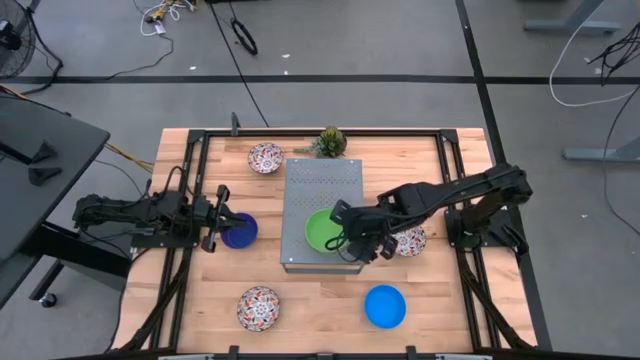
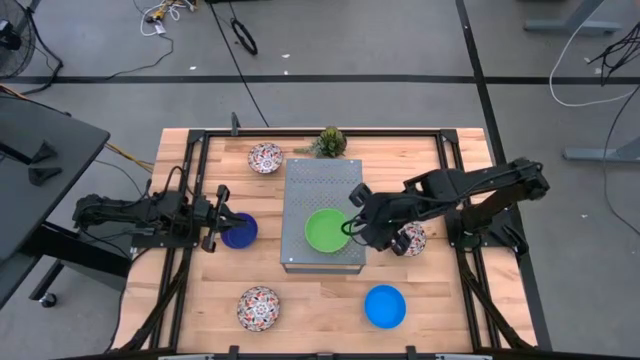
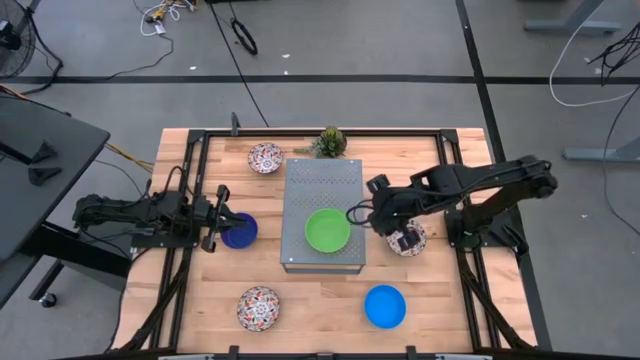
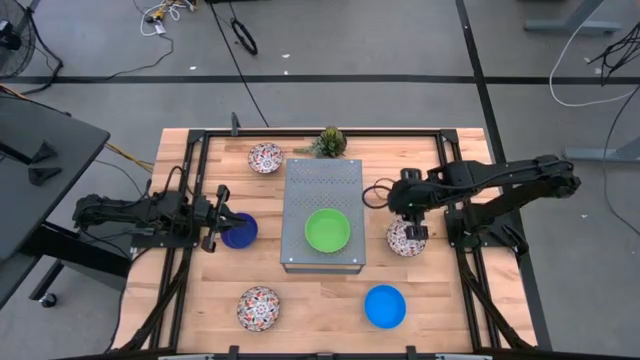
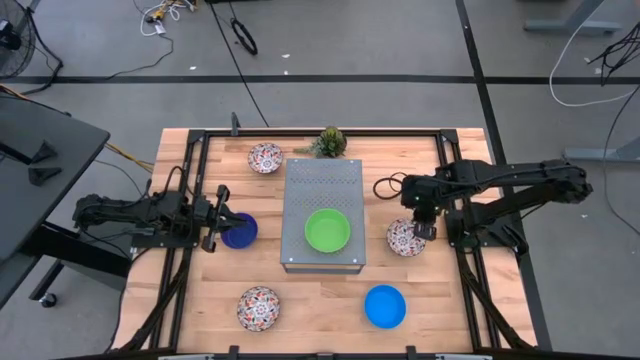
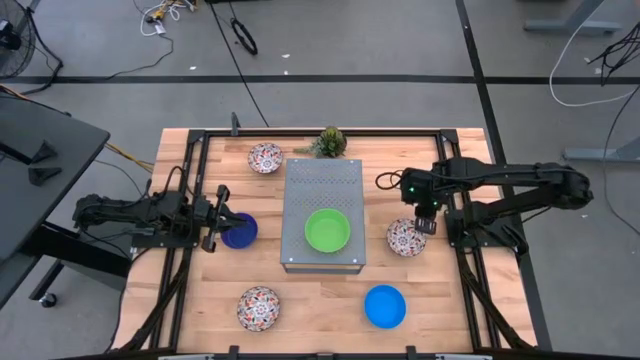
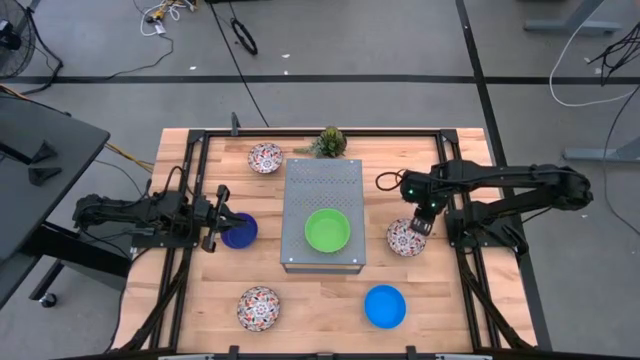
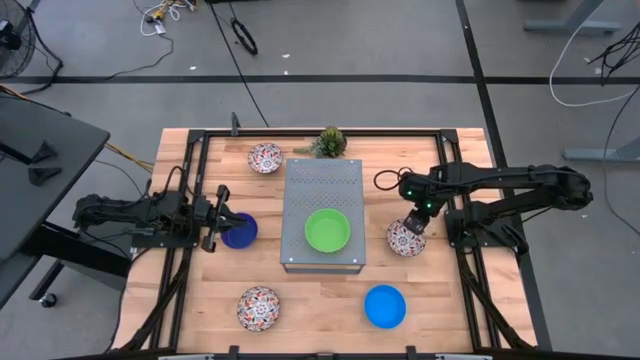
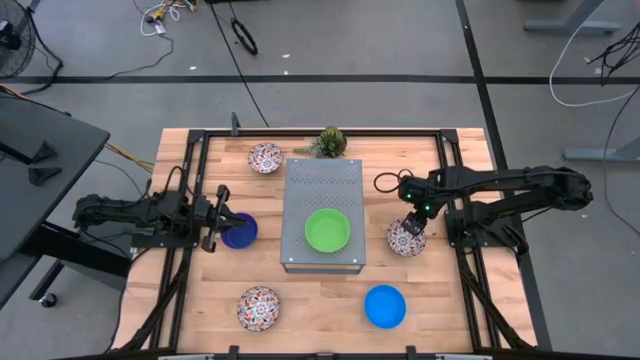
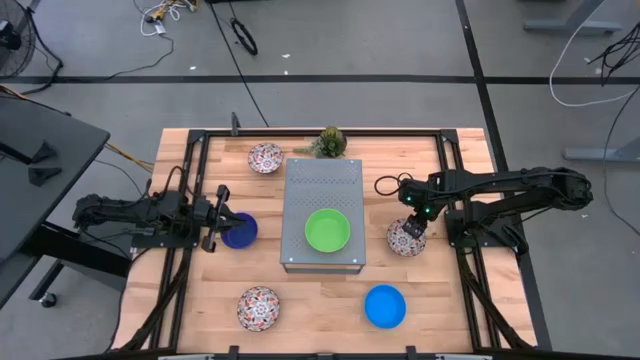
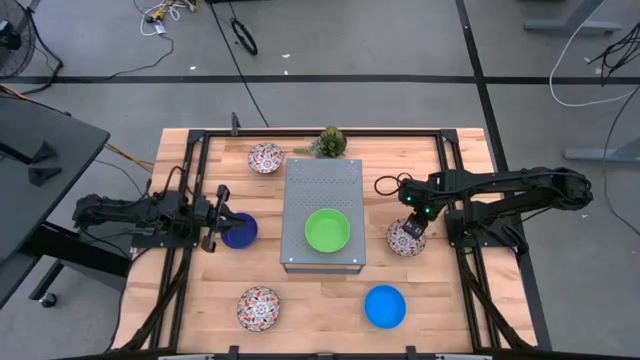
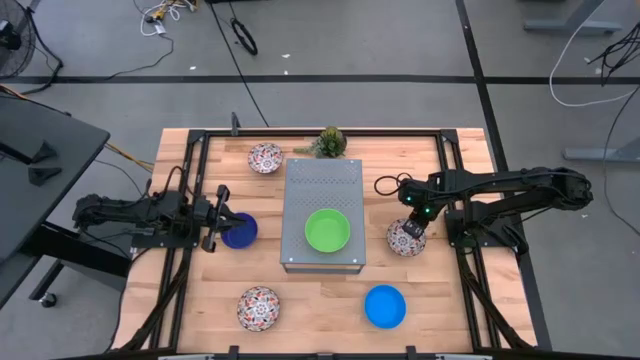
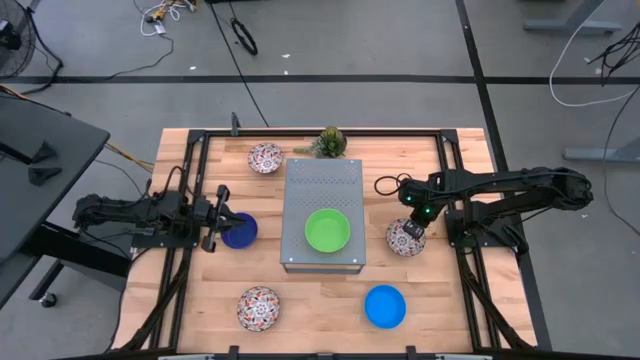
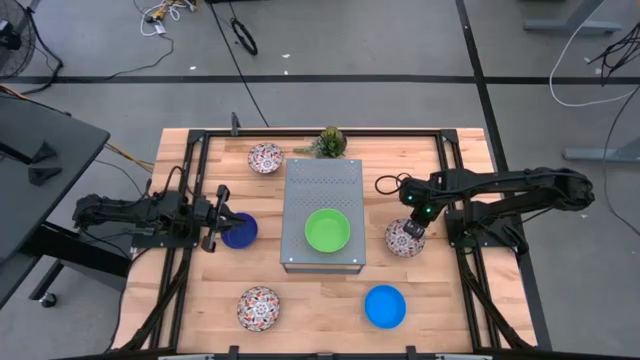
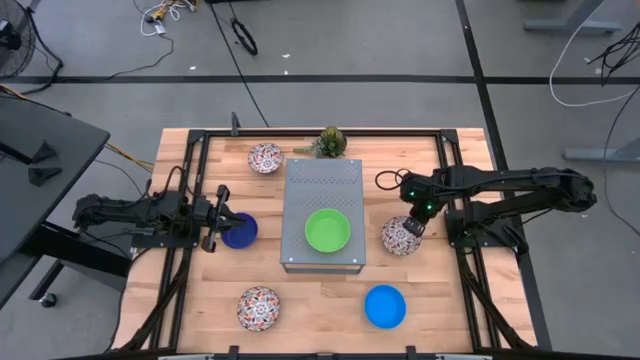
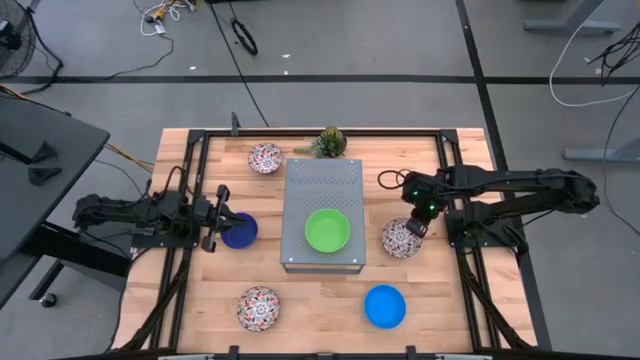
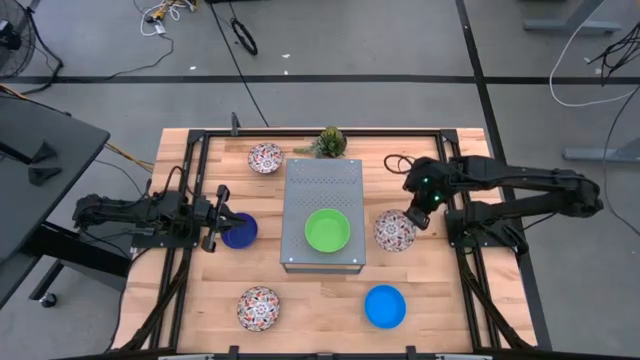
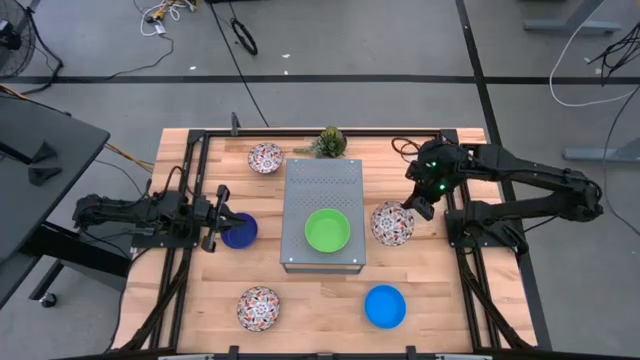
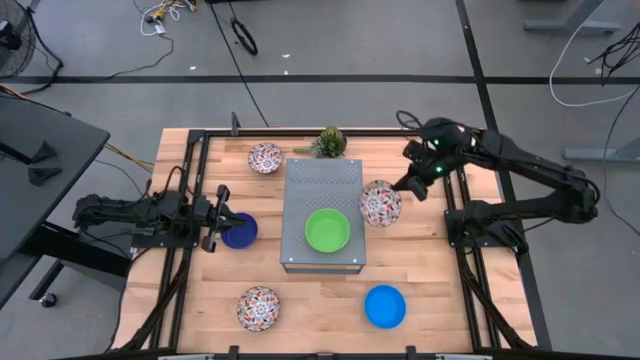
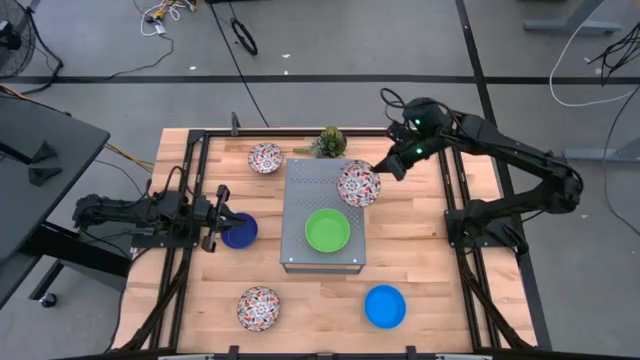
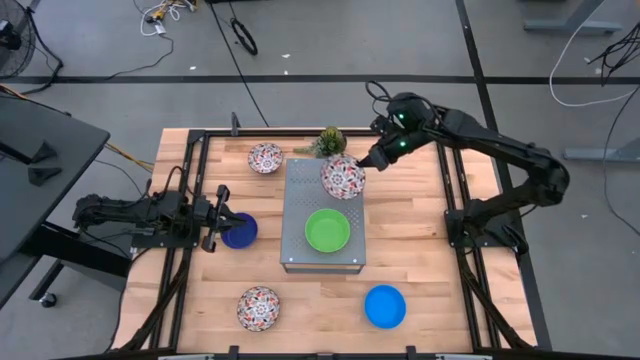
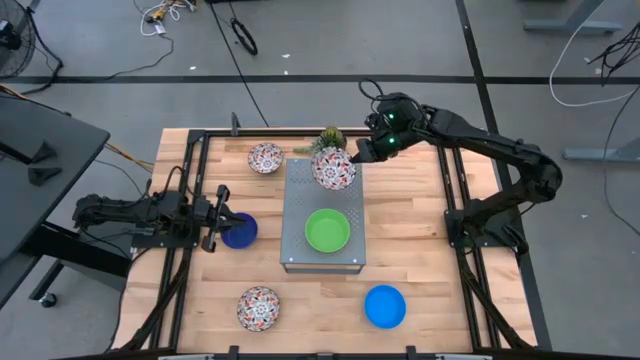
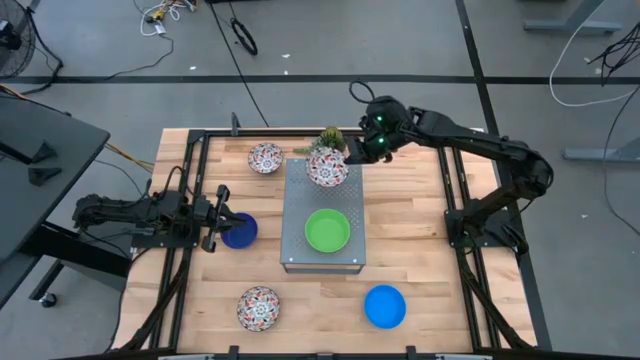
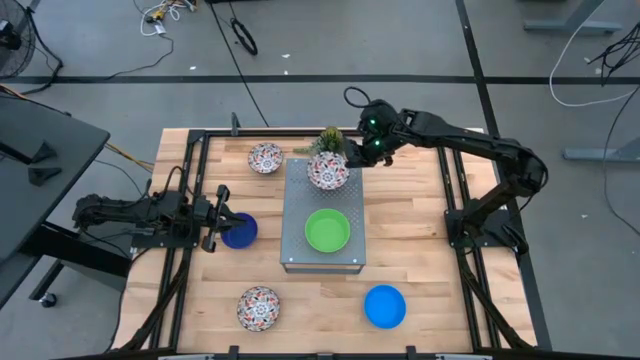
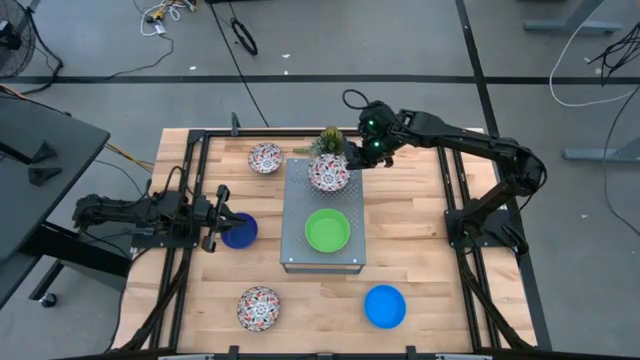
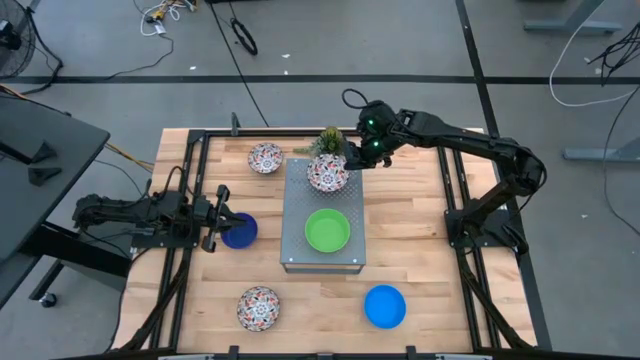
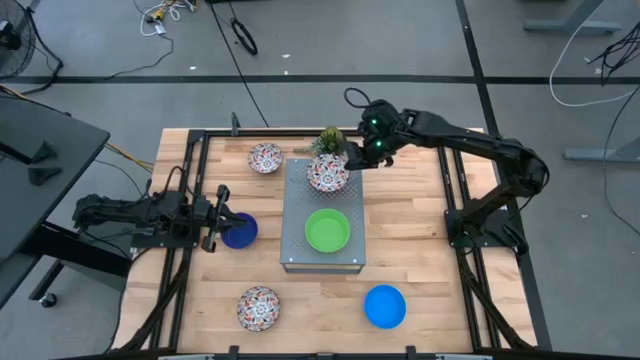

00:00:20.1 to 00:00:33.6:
Task: Pick & Place Mini bowls
Put the bottom right white patterned bowl on the shelf

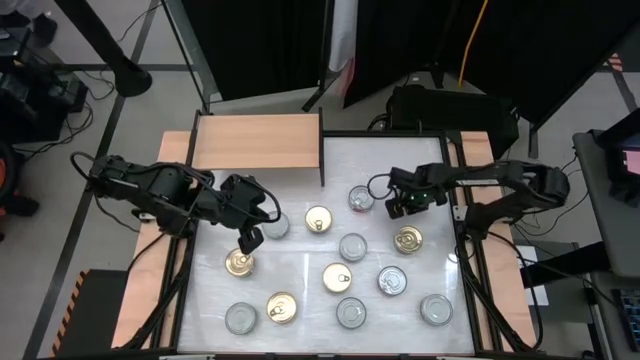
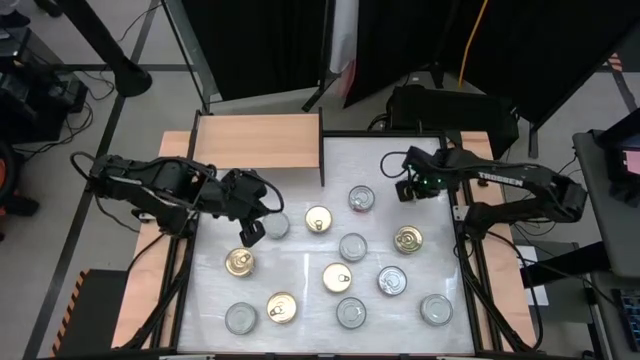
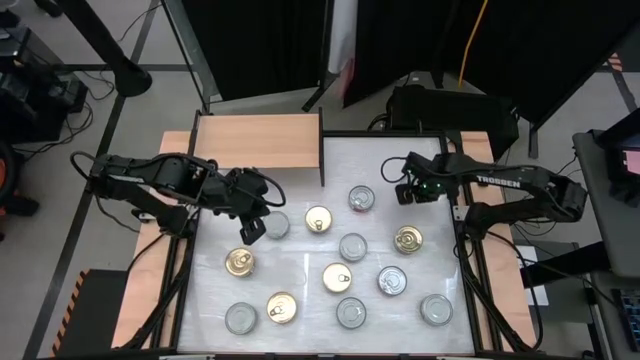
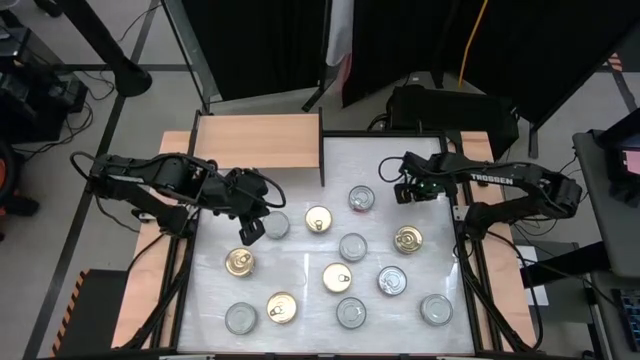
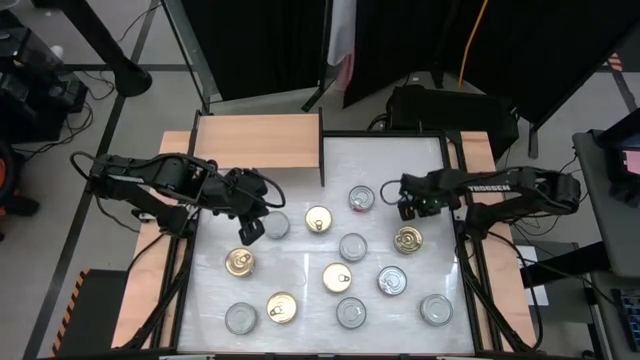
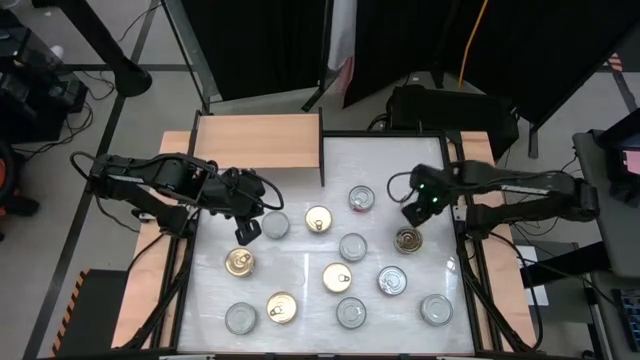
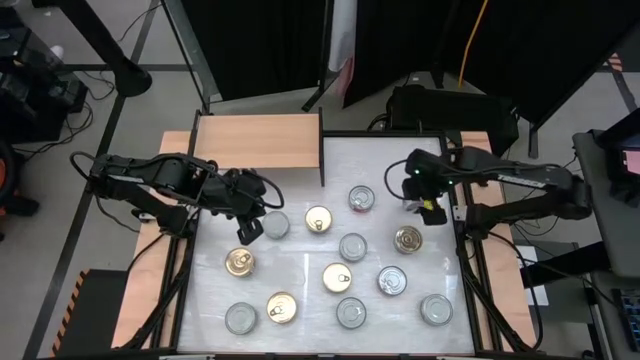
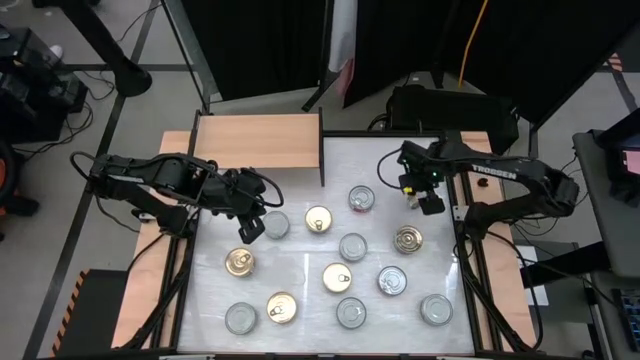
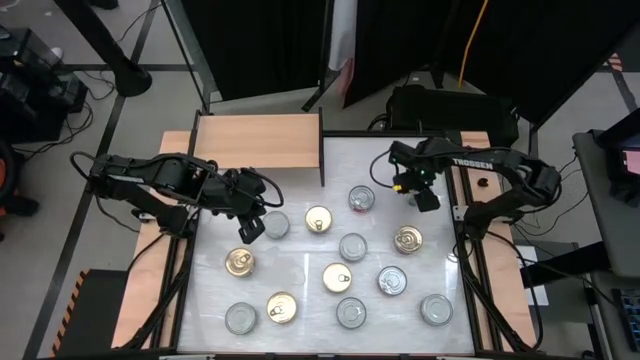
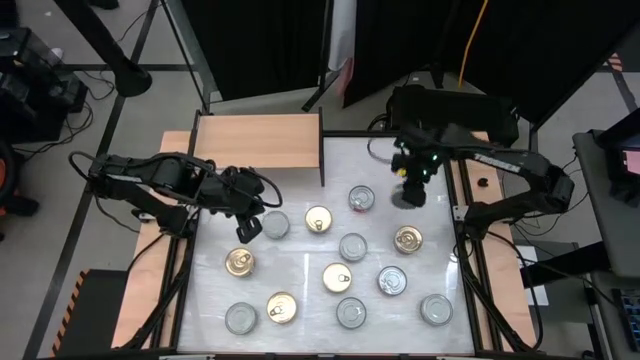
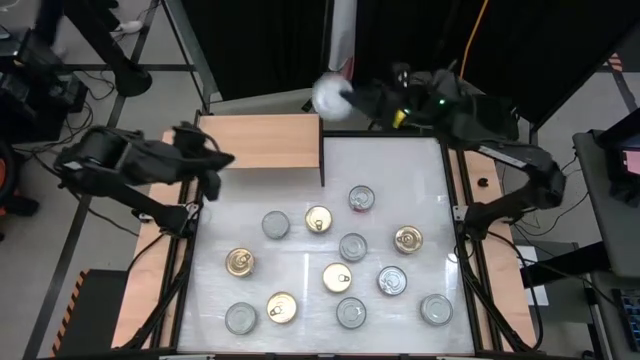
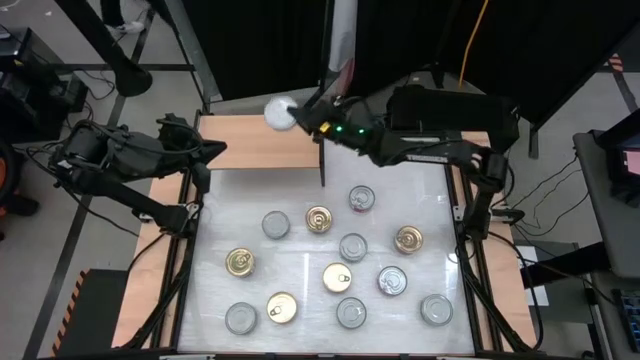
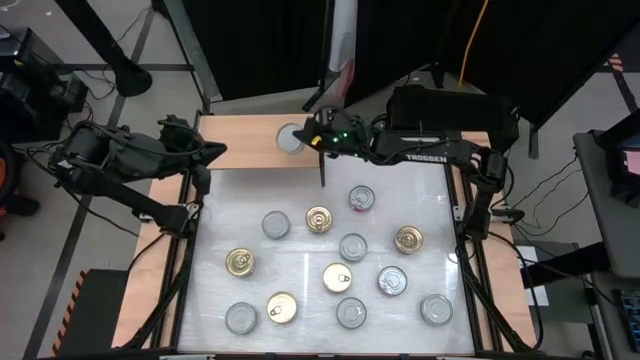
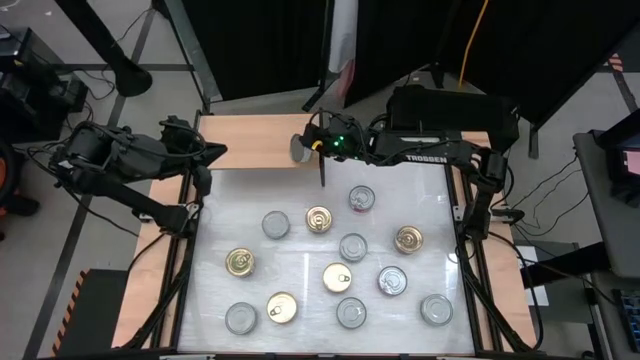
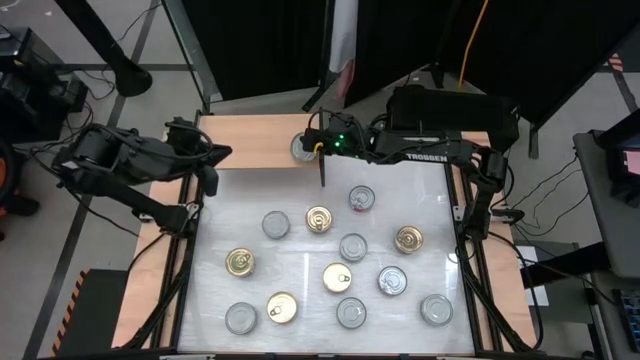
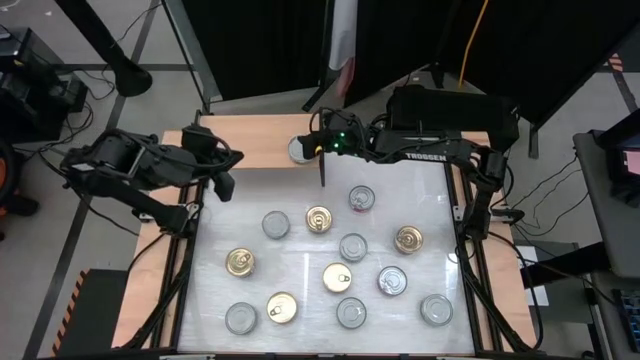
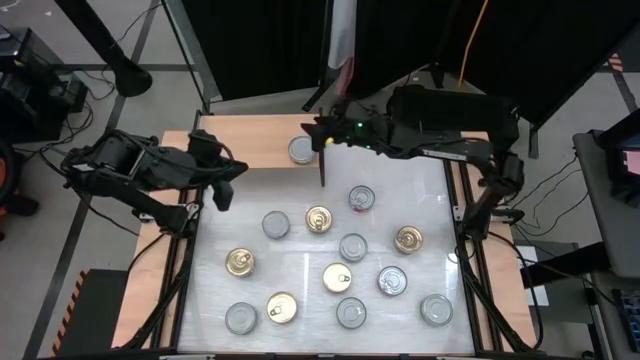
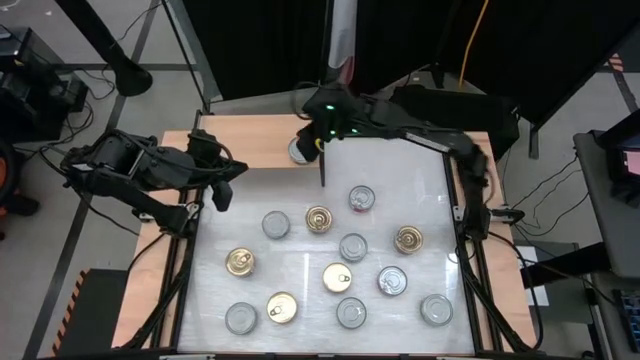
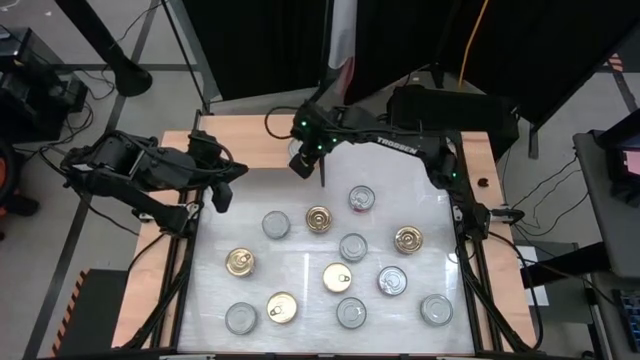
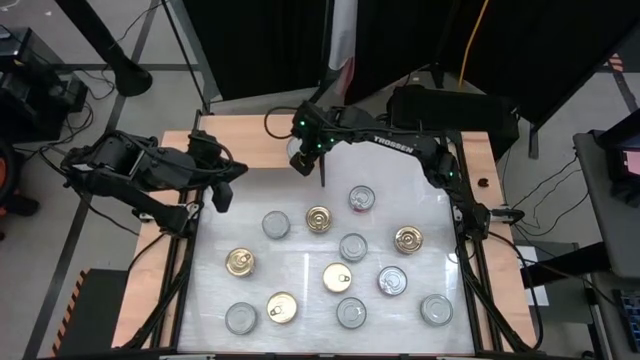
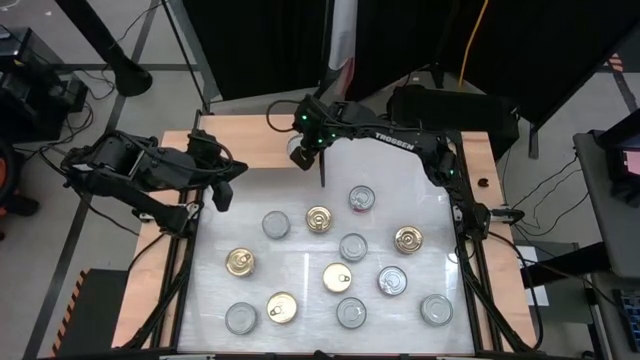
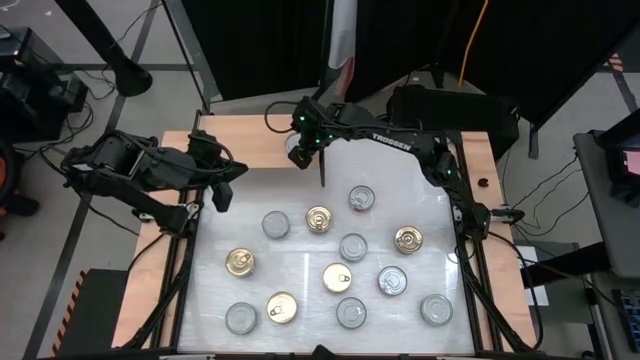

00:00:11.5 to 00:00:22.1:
Task: Stack canned seafood by type on shelf
Put the green white tuna can on the shelf
